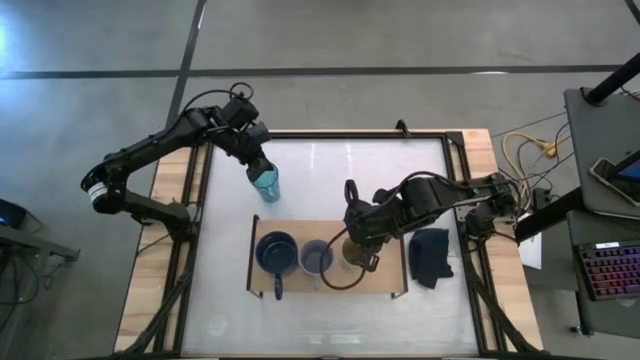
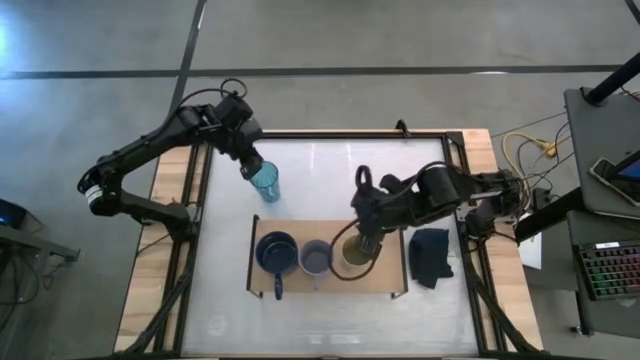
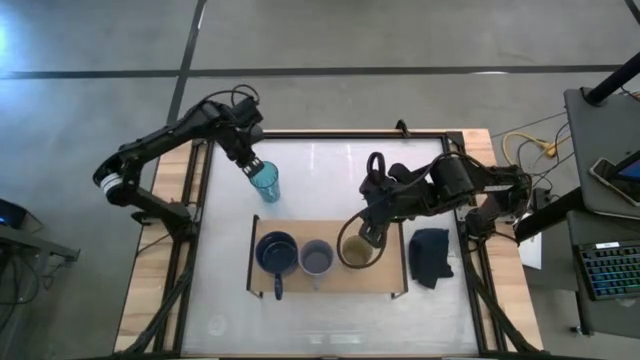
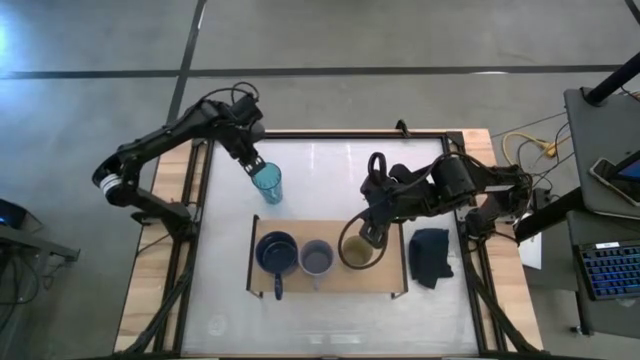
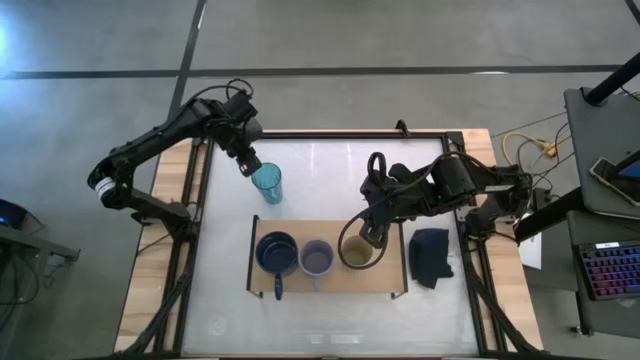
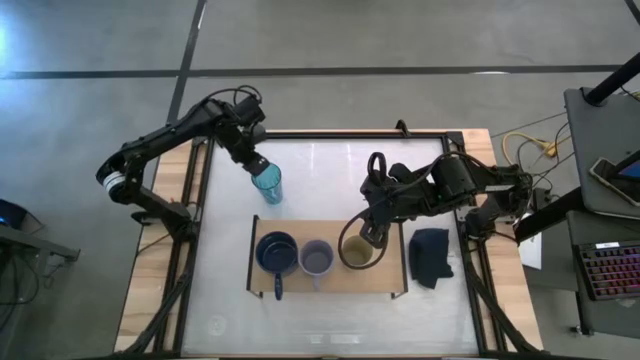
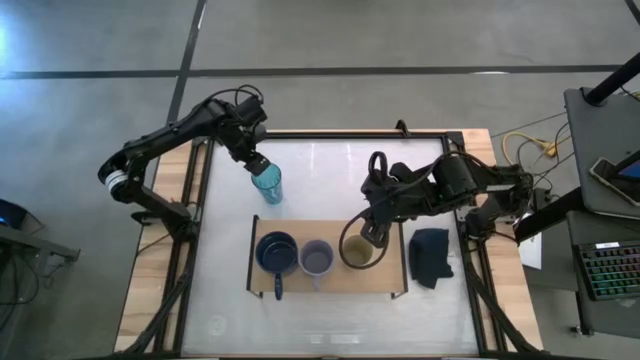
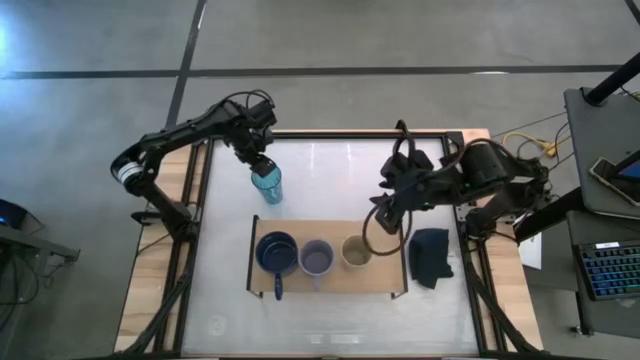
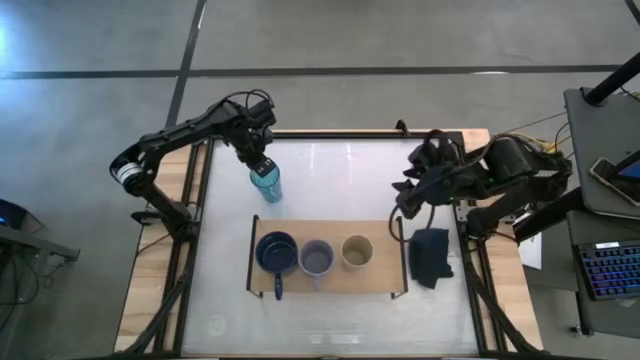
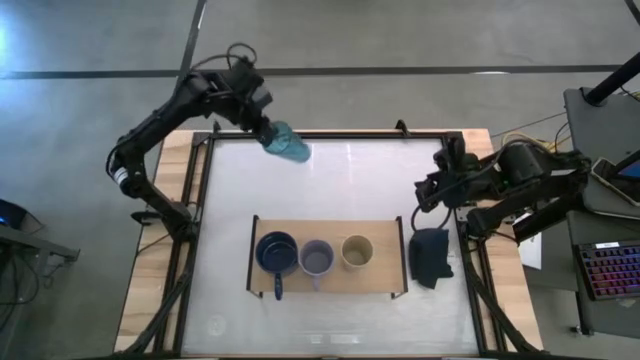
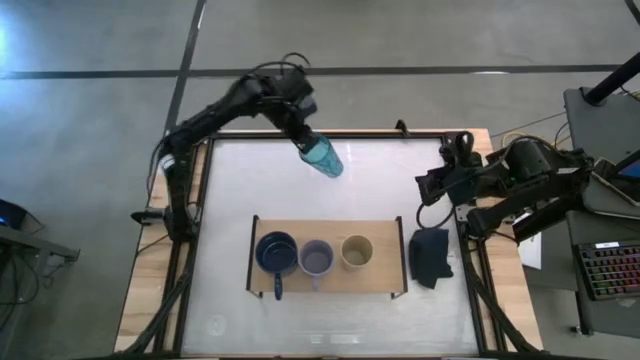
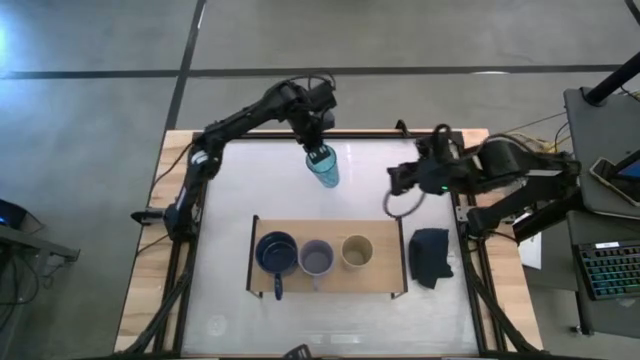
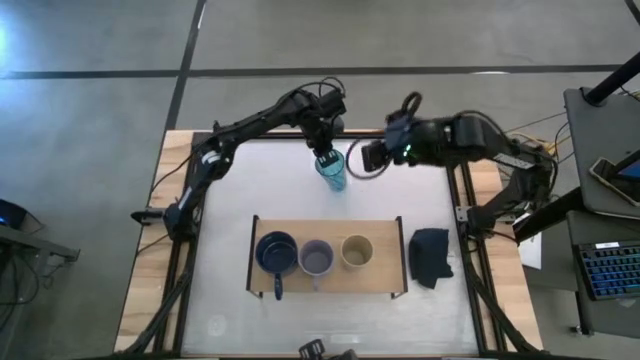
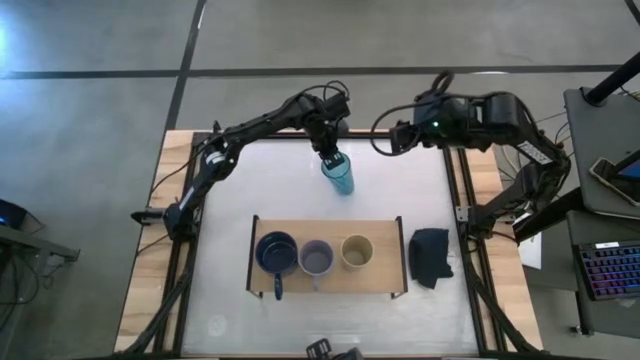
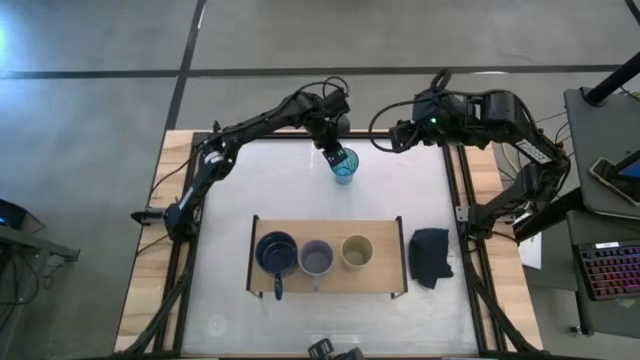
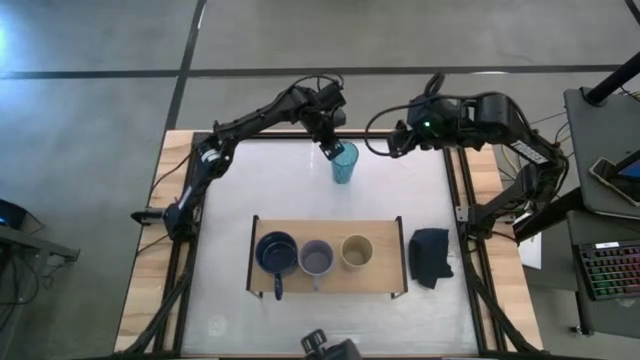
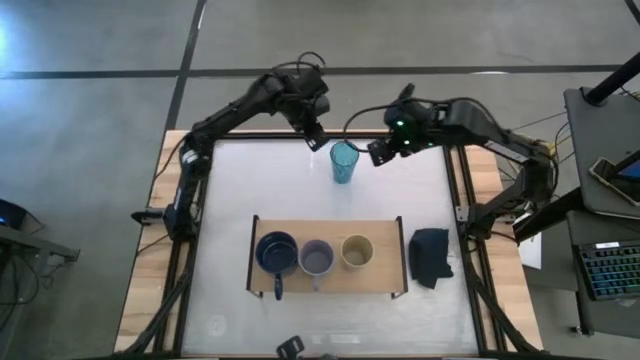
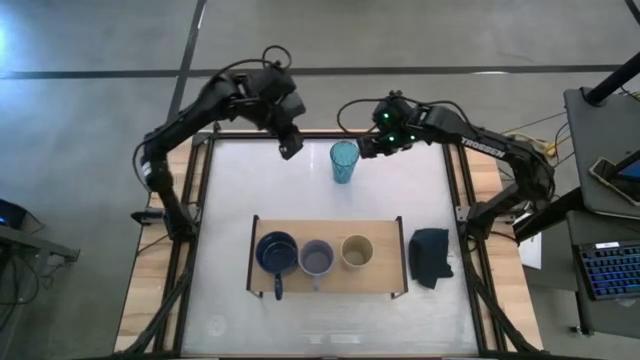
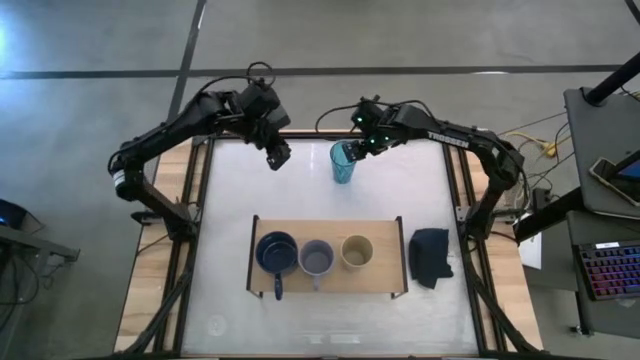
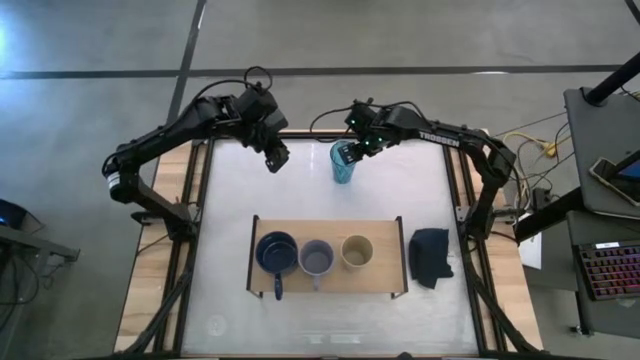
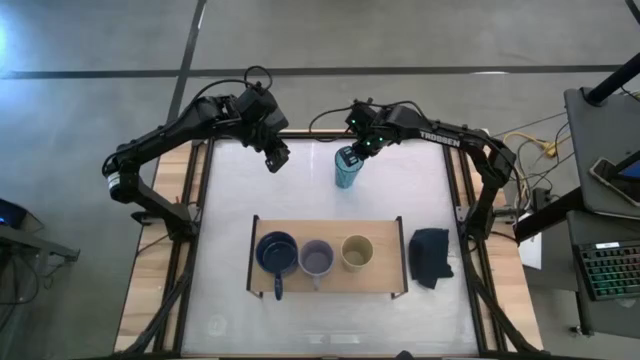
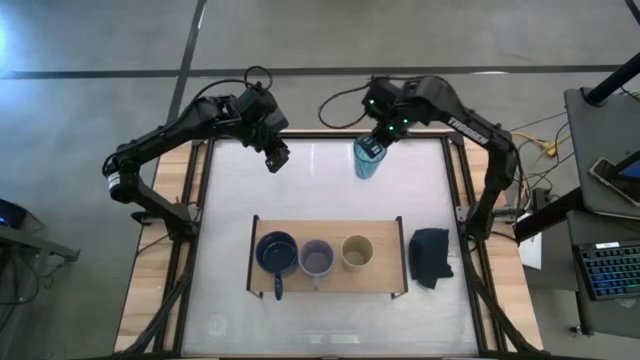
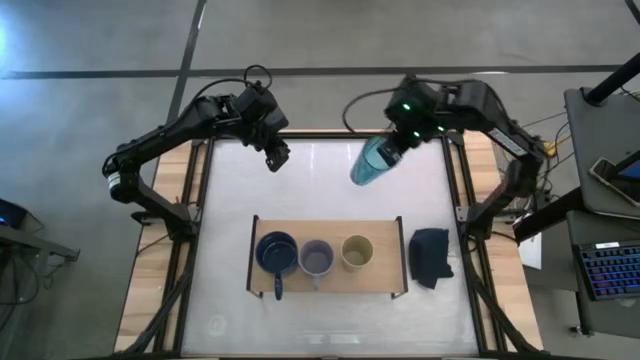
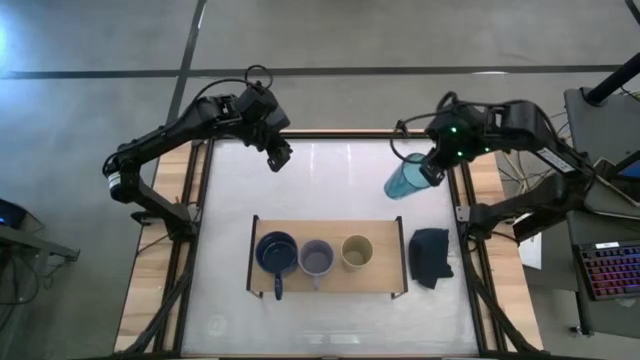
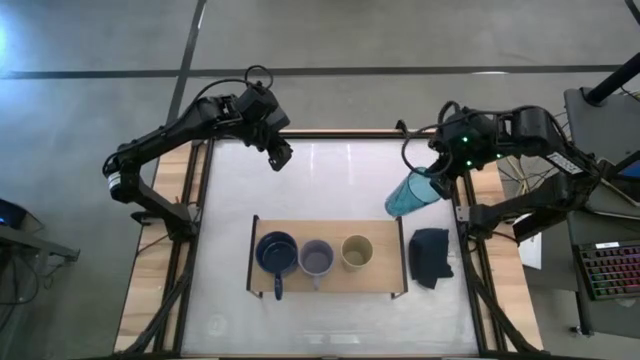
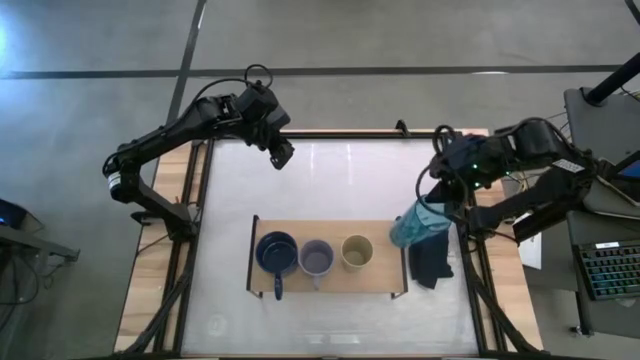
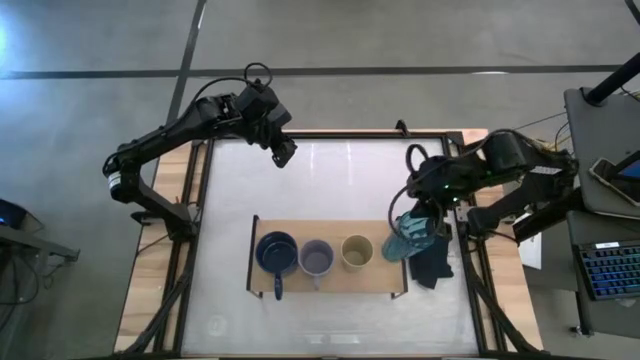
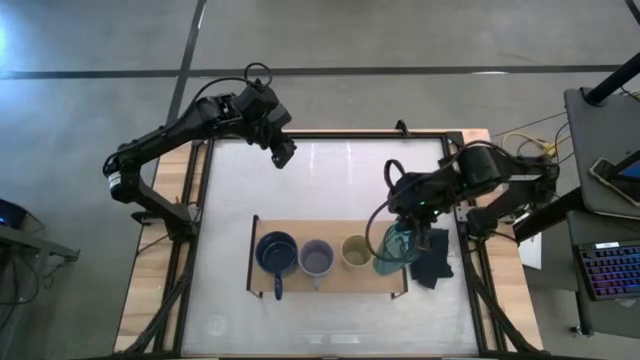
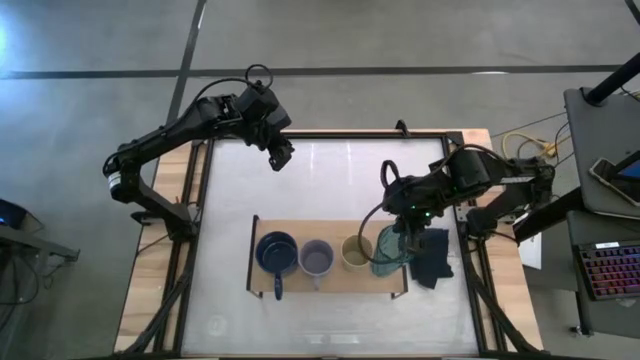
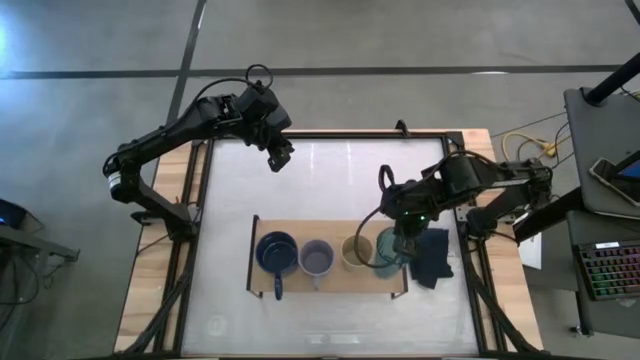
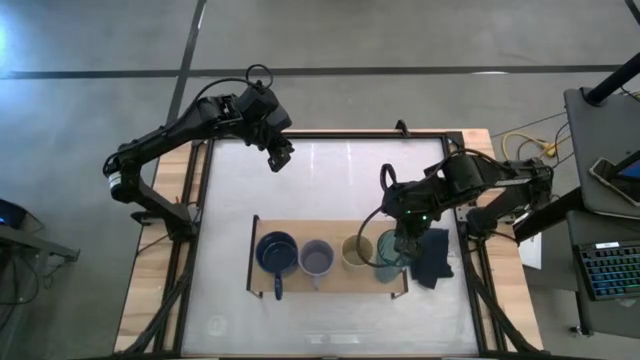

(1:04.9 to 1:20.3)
Task: Stack small to large cups/mugs on shelf
Put the blue cup on the shelf

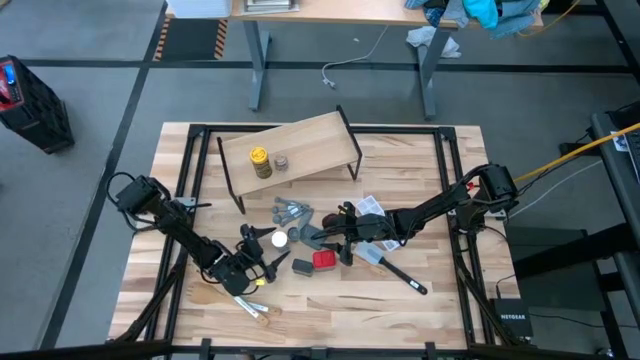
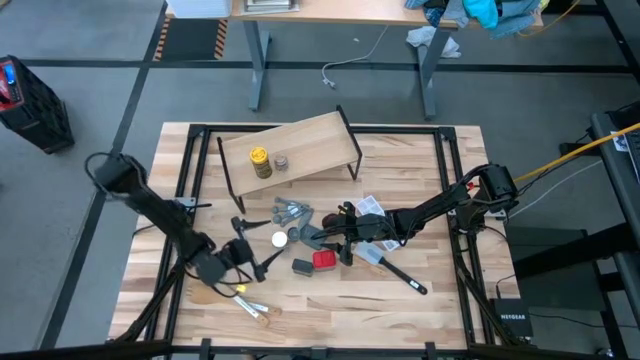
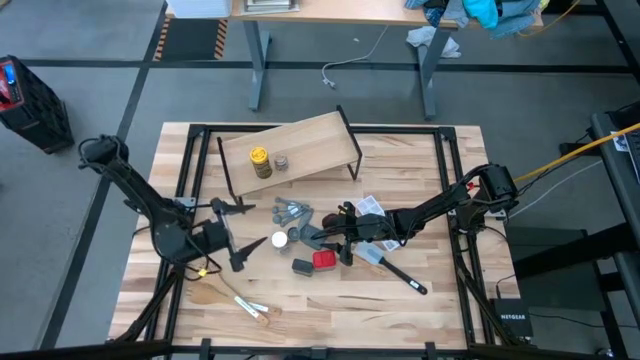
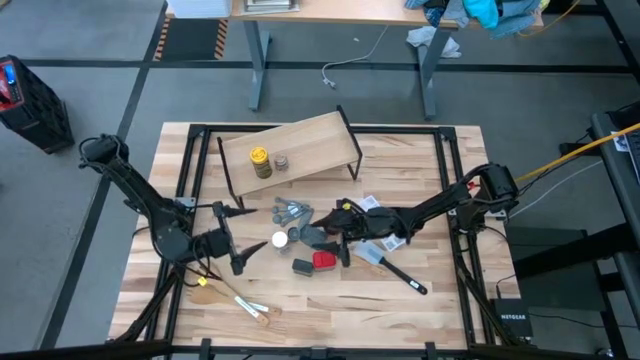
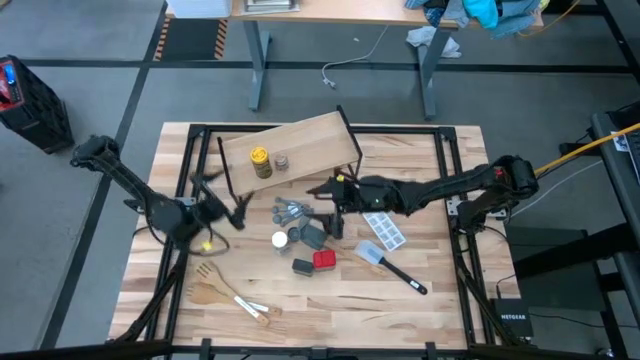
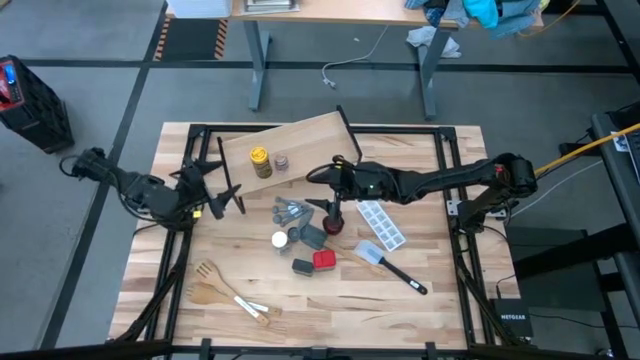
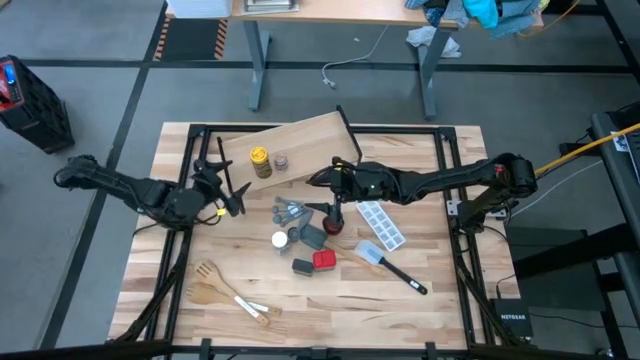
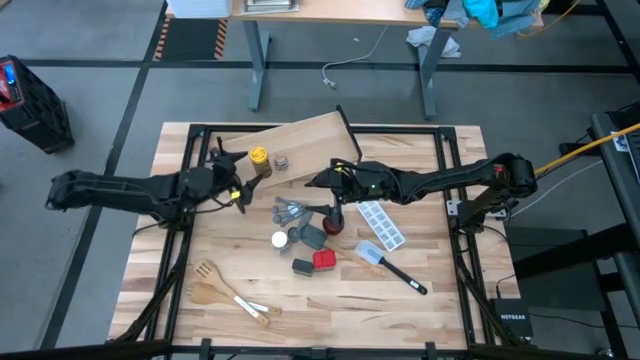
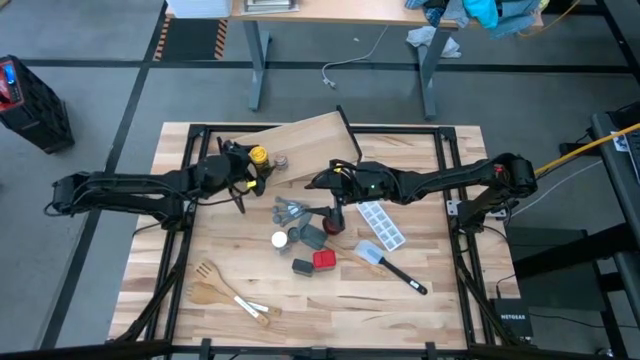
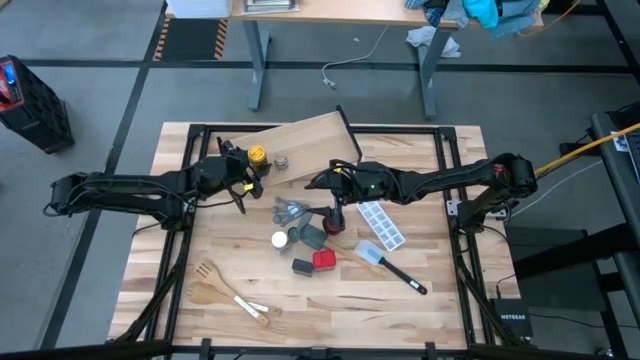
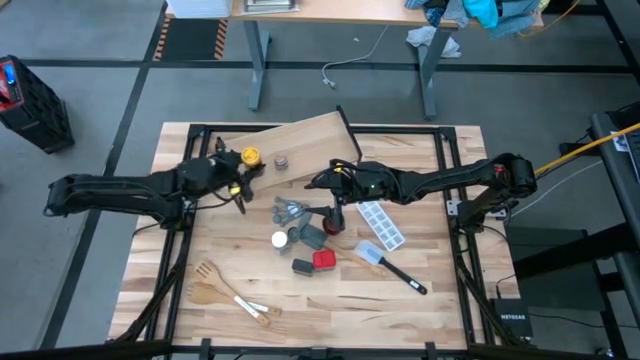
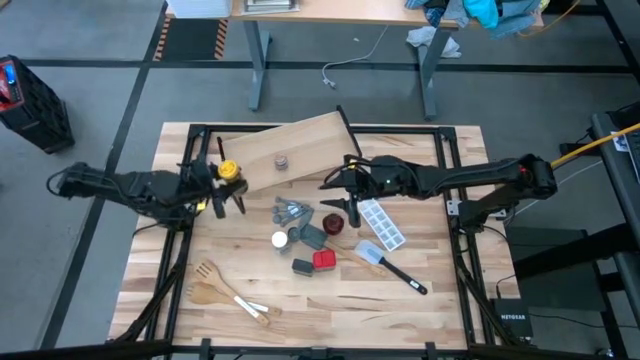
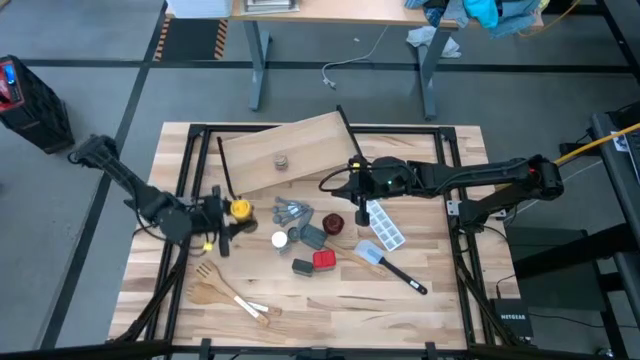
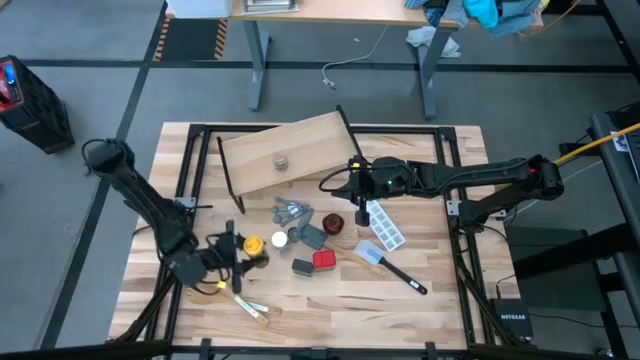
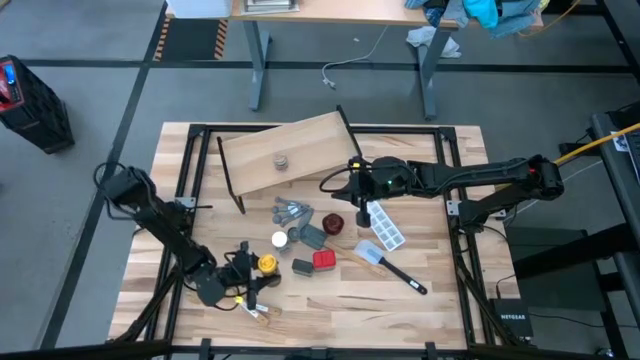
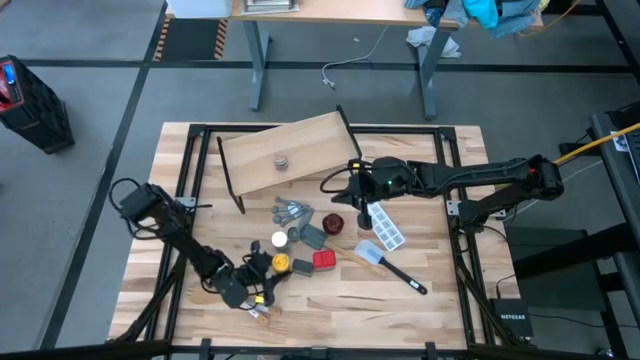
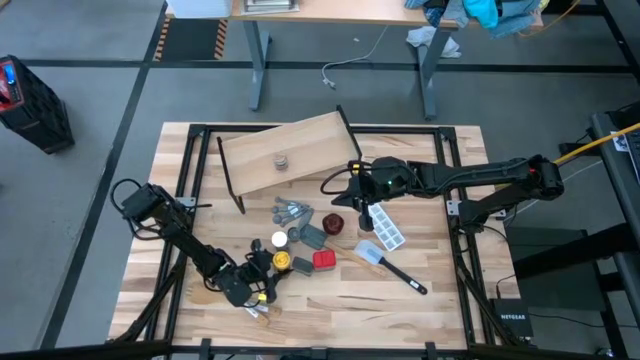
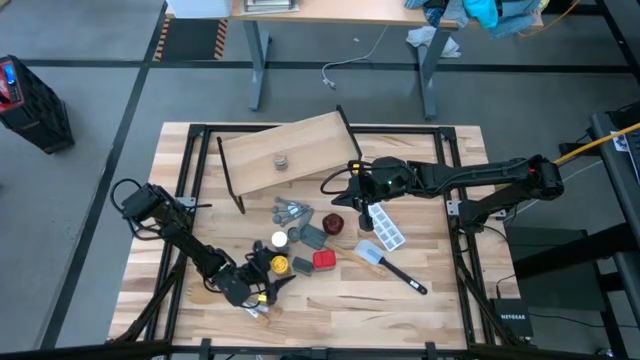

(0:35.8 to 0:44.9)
Task: Shelf spices
Remove the yellow seasoning bottle from the shelf
